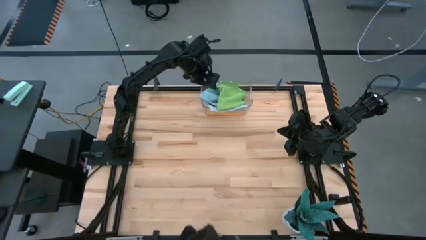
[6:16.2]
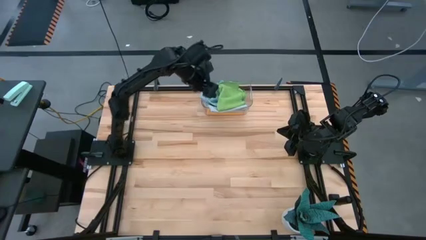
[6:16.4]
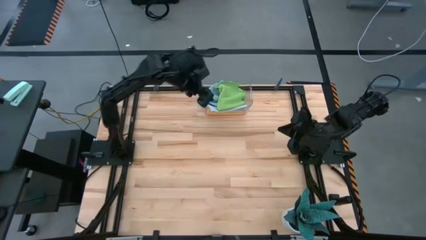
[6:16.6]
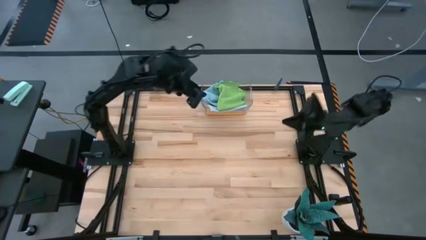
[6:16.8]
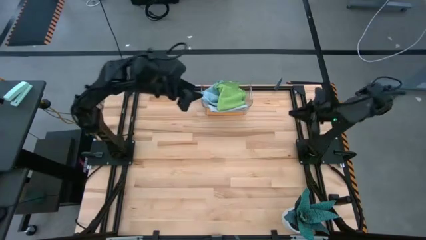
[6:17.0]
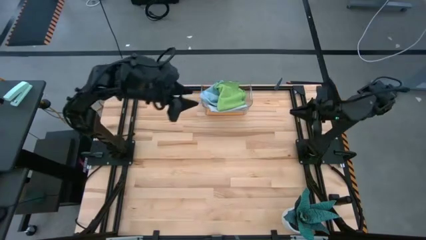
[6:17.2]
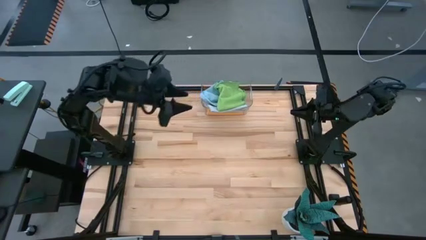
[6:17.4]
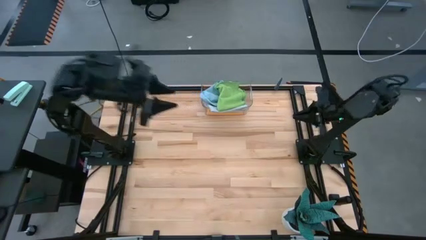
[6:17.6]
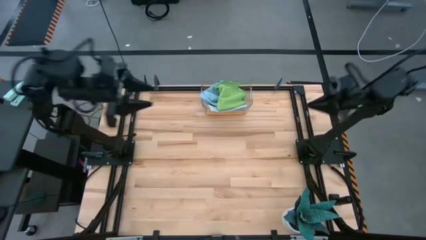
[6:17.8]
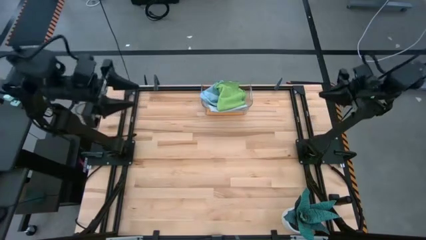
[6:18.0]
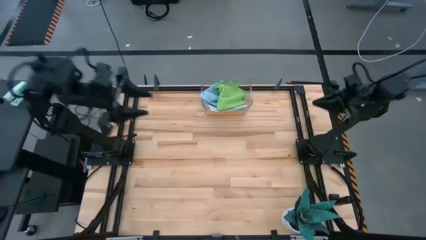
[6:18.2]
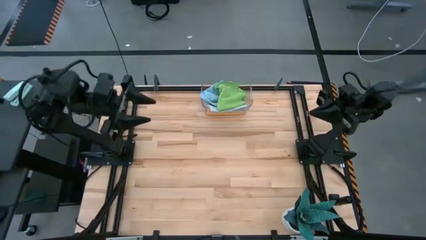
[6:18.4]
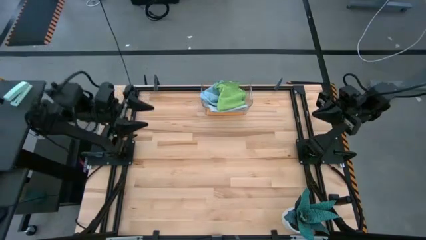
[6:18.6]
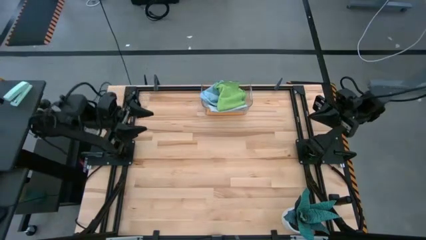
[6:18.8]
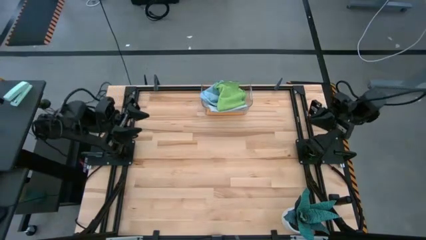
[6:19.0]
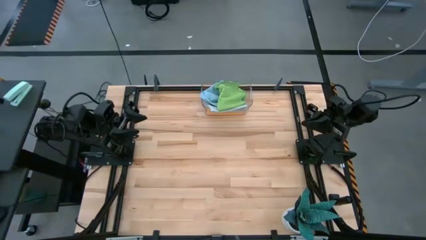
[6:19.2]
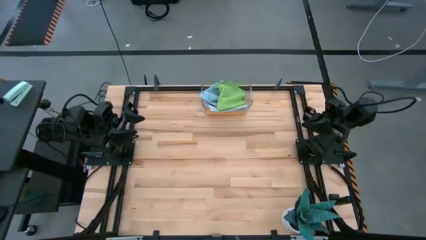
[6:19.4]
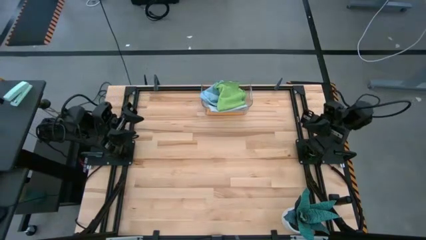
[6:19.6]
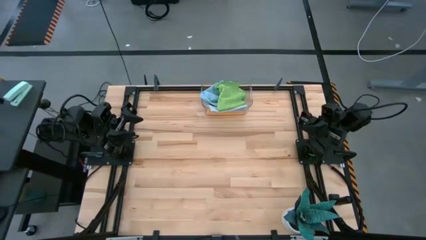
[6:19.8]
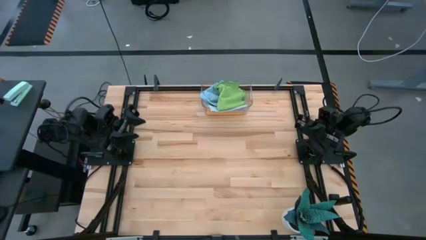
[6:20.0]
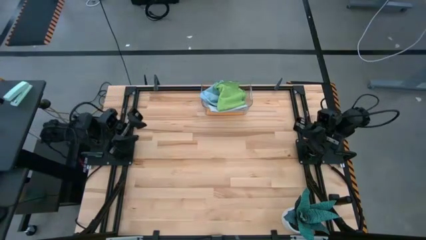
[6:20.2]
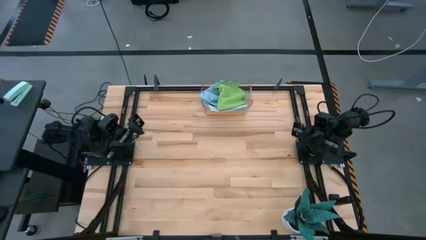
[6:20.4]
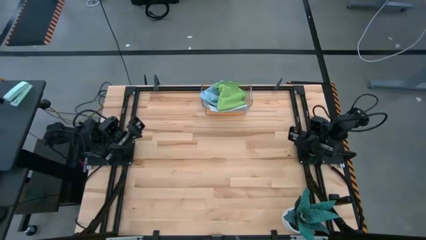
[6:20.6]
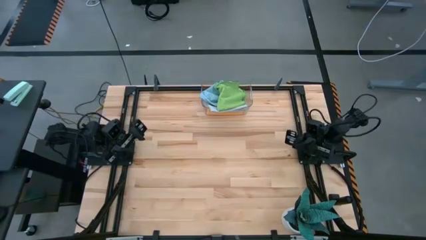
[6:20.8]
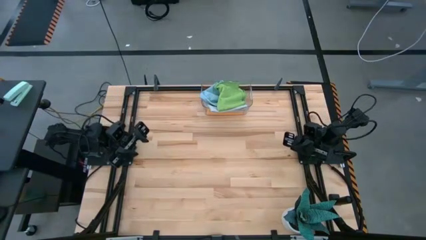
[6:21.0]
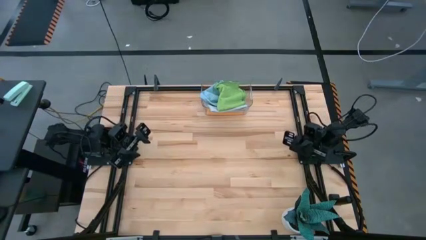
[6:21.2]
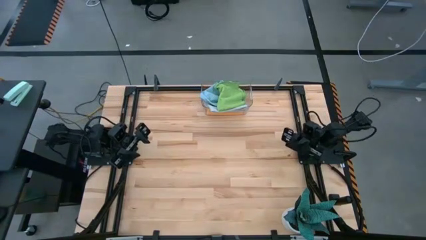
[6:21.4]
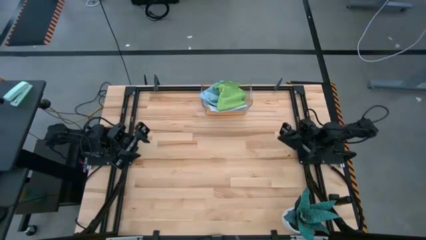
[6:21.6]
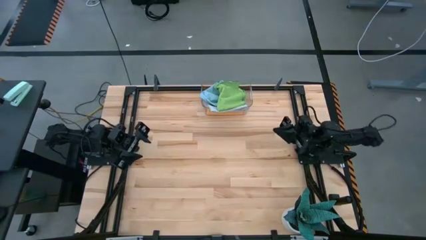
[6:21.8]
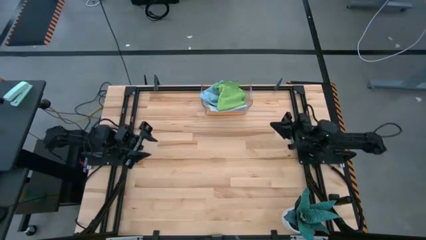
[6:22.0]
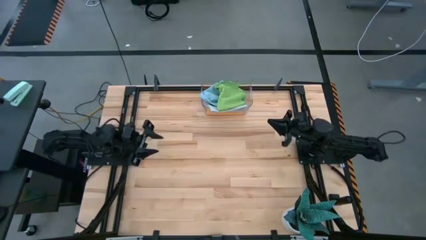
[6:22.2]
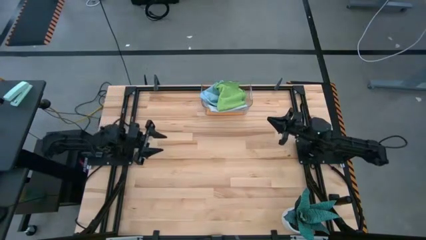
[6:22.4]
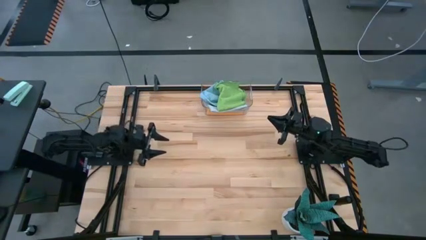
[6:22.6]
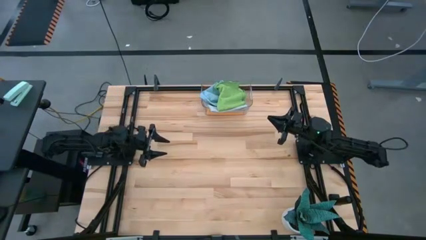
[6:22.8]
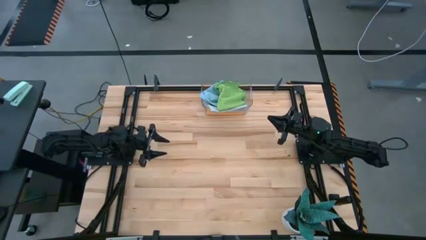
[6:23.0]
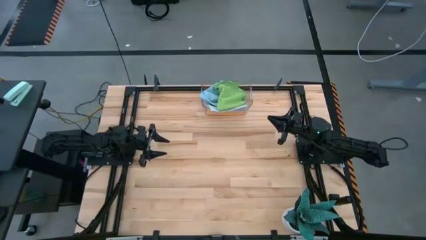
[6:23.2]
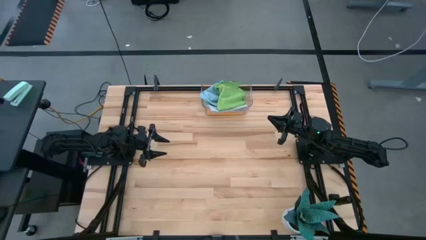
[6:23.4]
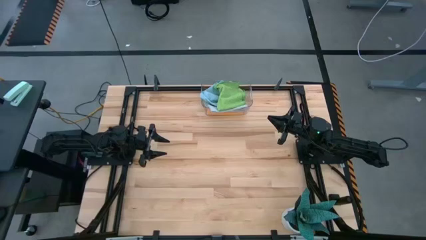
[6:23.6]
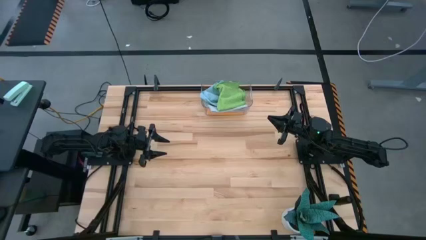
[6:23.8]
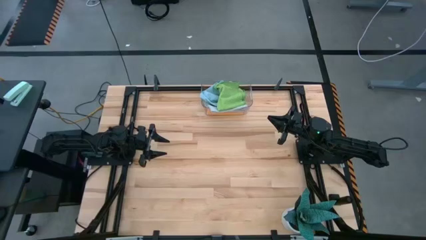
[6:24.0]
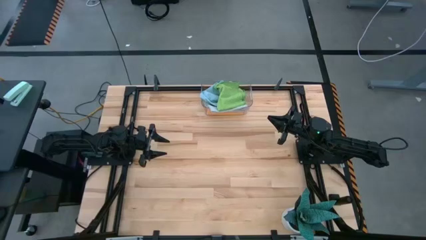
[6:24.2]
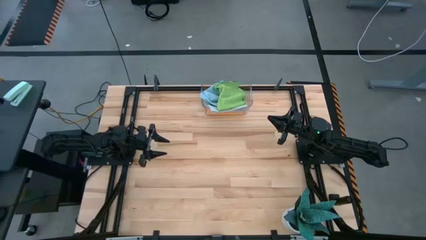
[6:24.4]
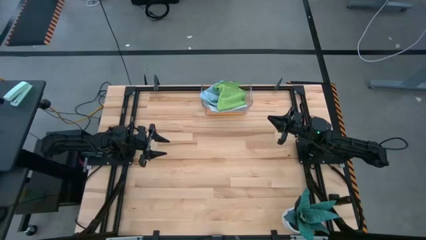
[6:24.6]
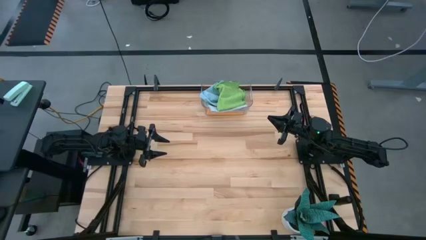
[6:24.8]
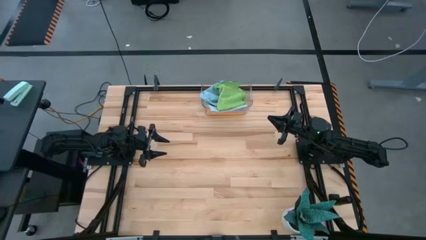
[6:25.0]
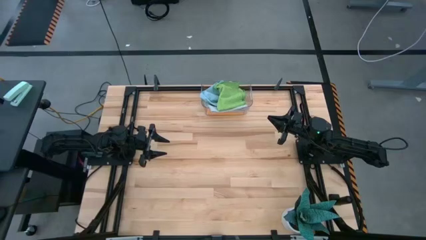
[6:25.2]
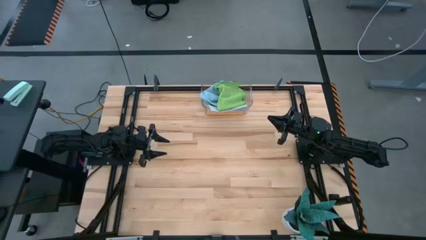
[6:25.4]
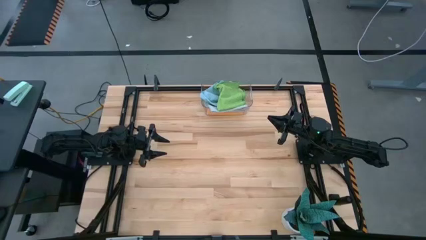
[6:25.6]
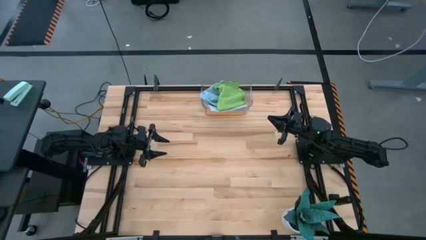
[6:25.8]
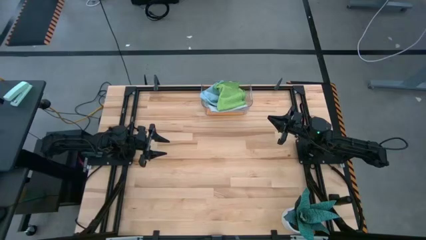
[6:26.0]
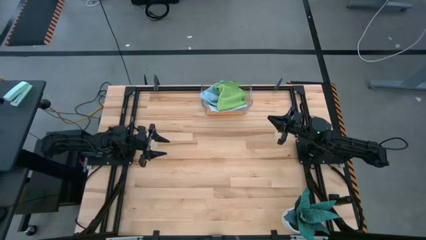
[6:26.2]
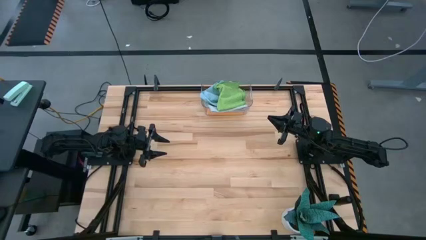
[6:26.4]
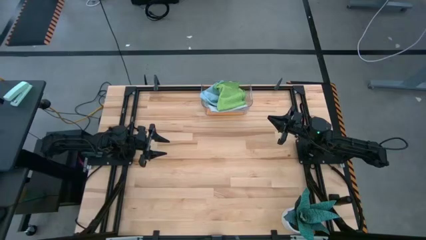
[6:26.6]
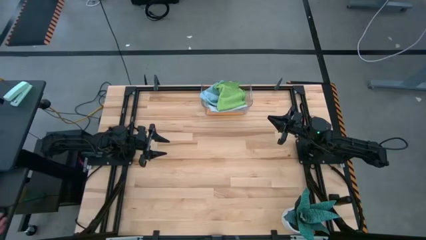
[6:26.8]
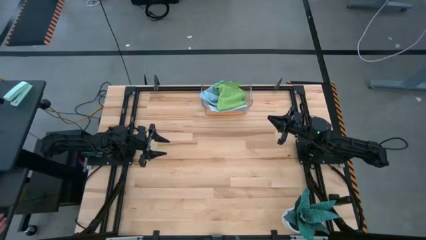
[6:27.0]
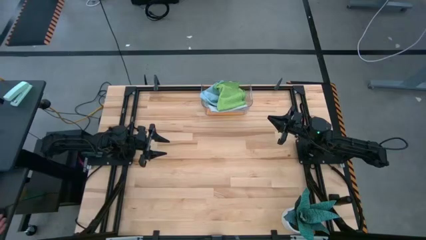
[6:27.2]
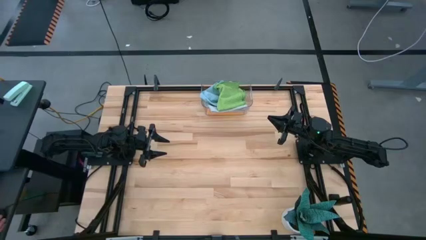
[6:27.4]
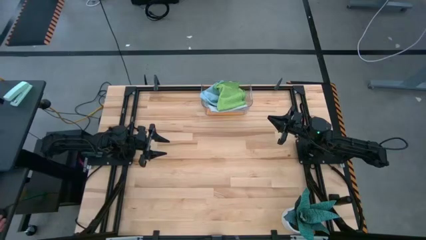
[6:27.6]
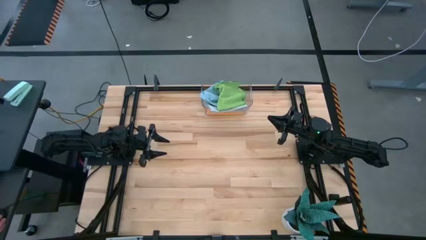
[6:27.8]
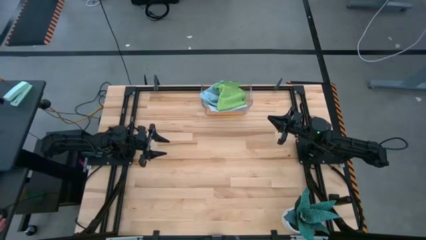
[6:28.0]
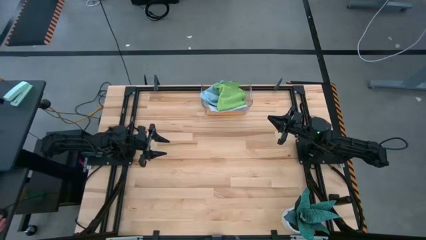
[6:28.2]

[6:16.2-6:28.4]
Task: Fold microfiber towels
Return to Home Position

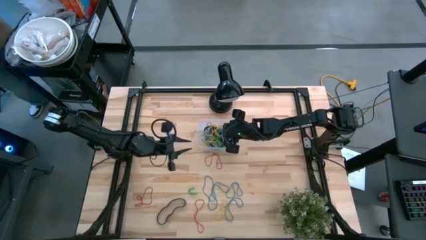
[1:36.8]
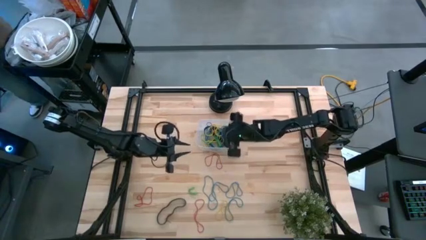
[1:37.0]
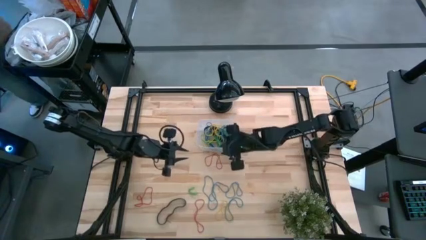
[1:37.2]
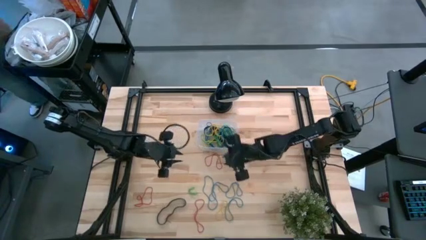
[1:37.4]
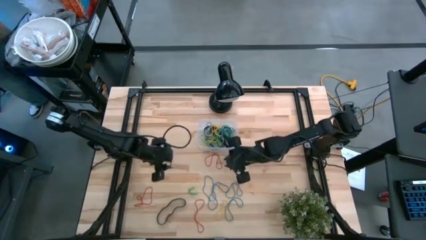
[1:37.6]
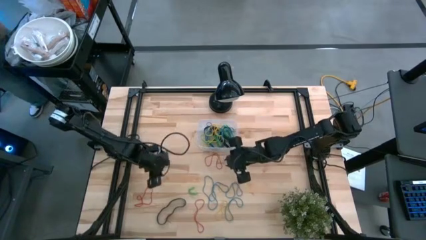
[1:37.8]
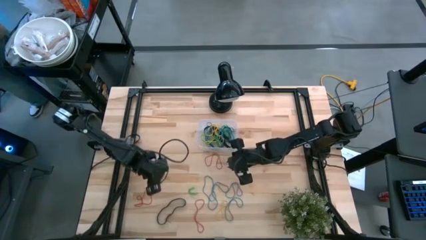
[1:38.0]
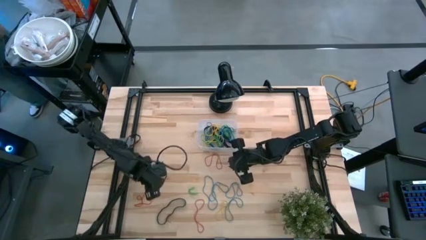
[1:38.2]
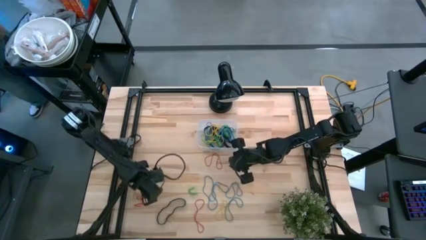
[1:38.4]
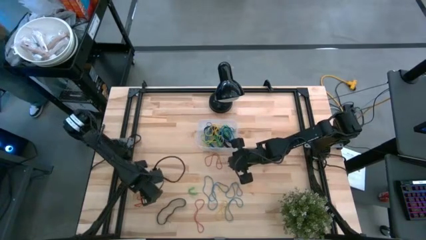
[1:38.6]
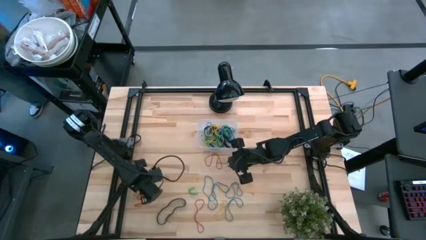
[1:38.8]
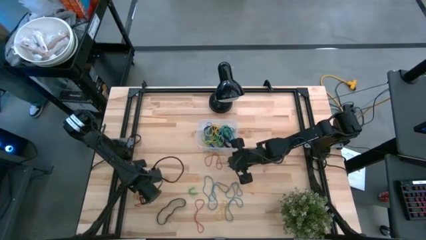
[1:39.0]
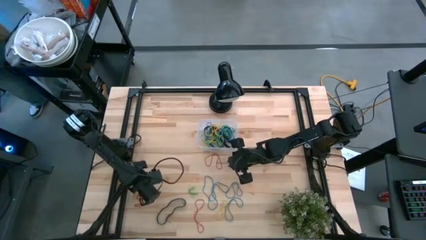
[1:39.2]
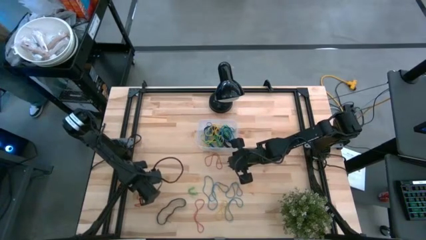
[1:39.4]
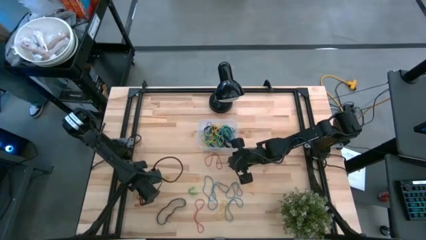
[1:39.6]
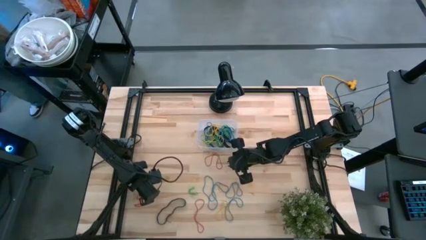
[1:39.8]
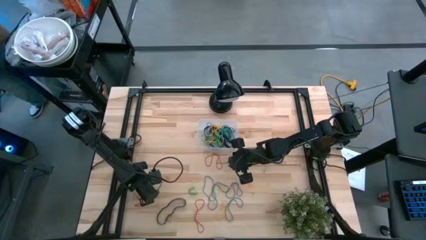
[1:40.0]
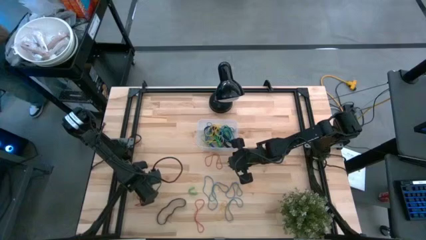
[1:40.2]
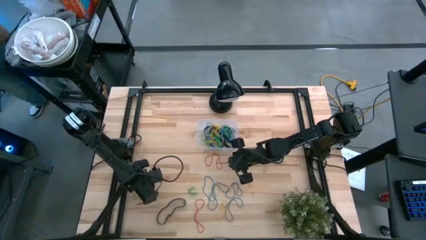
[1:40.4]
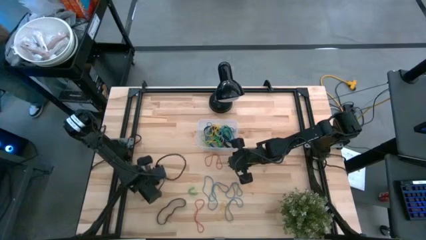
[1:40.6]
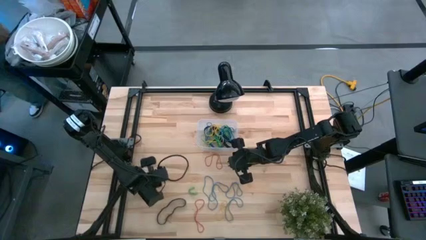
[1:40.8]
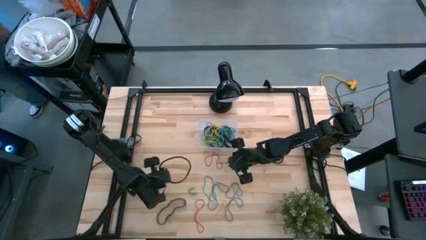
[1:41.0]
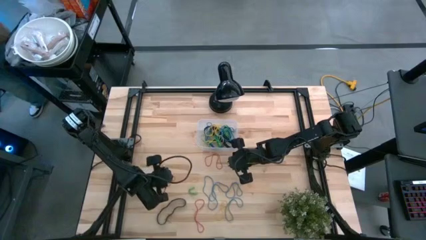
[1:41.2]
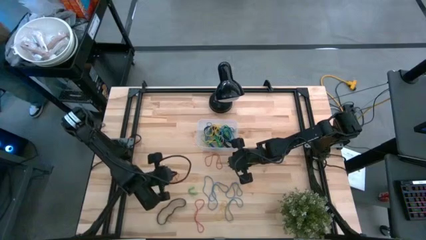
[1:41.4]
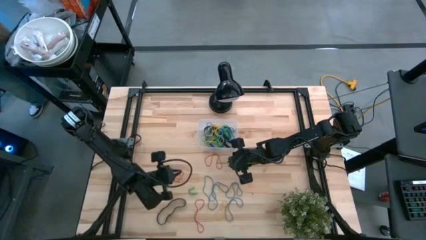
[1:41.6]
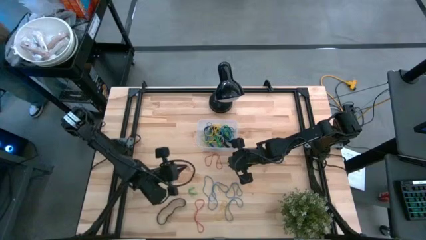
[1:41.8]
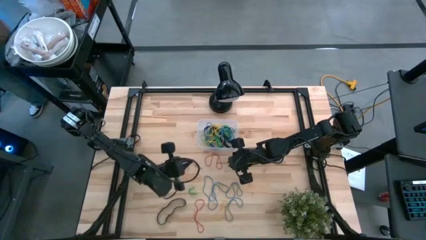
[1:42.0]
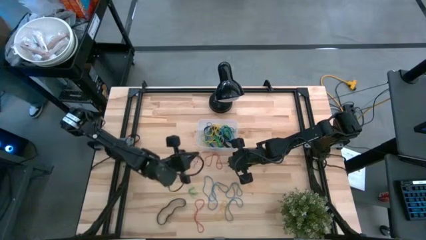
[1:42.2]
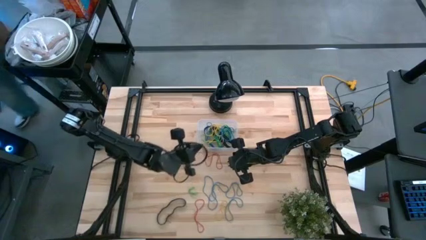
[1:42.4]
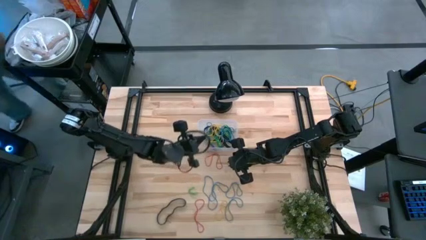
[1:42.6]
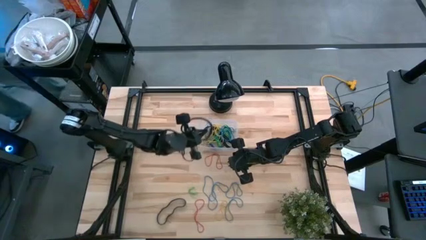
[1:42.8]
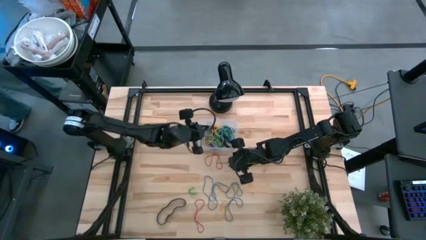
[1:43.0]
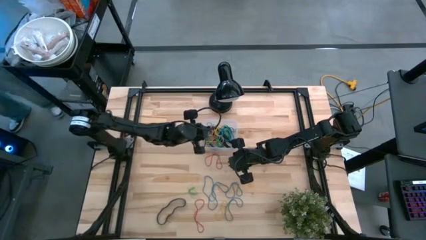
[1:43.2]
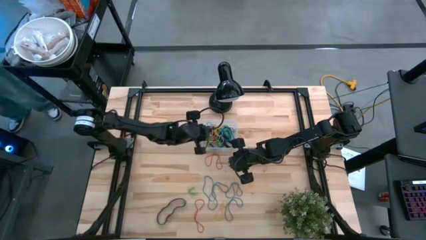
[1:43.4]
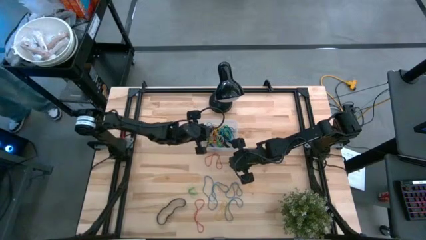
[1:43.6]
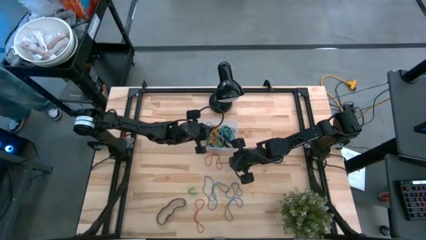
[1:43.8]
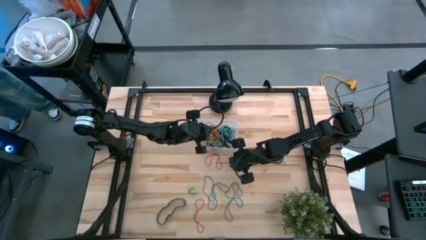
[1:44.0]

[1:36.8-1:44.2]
Task: Pick and place rubber bands into bin
Put the red rubber band into the transparent bin
